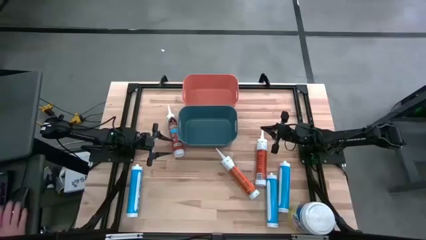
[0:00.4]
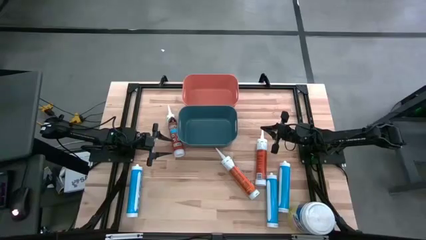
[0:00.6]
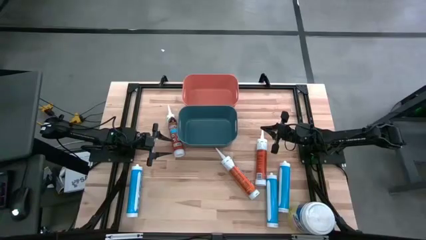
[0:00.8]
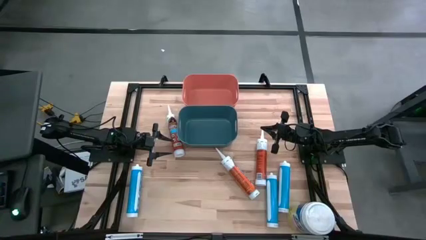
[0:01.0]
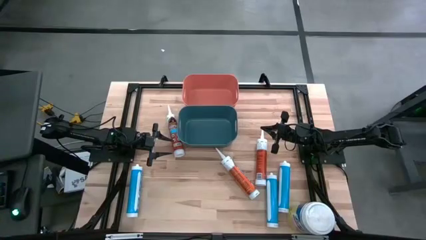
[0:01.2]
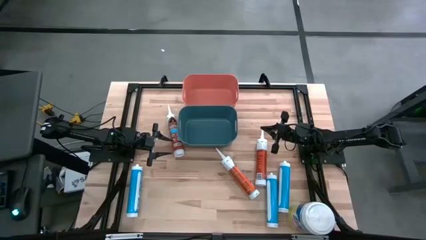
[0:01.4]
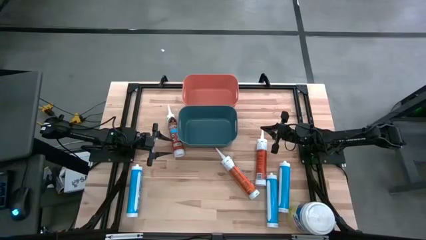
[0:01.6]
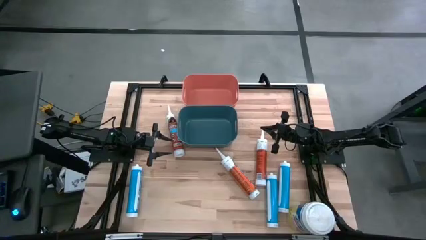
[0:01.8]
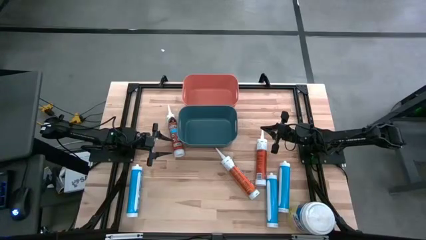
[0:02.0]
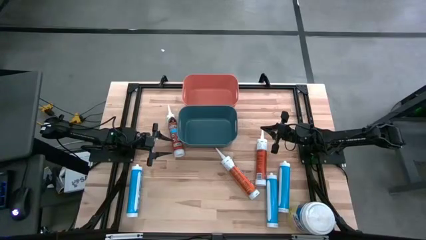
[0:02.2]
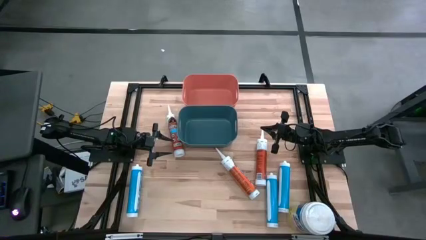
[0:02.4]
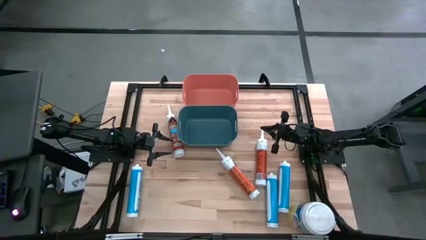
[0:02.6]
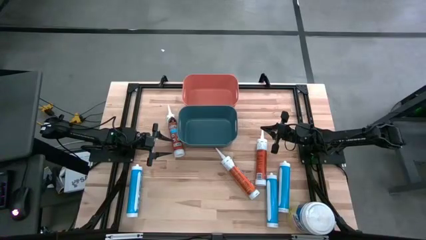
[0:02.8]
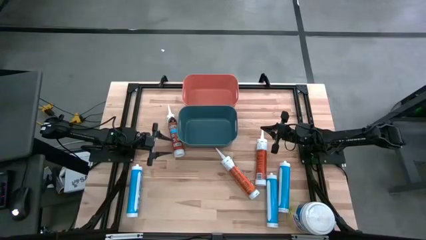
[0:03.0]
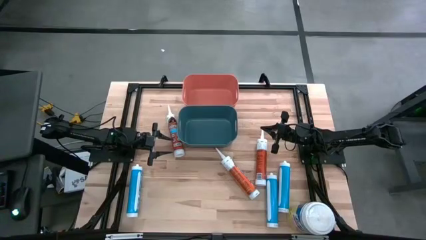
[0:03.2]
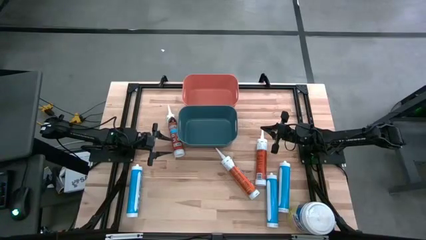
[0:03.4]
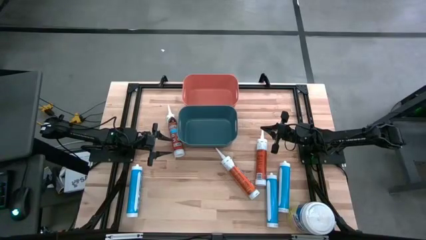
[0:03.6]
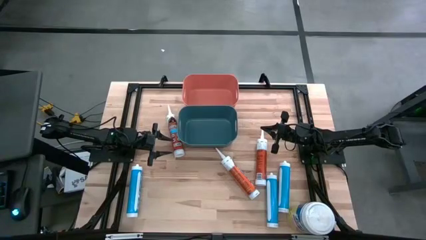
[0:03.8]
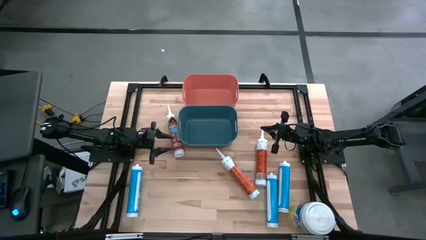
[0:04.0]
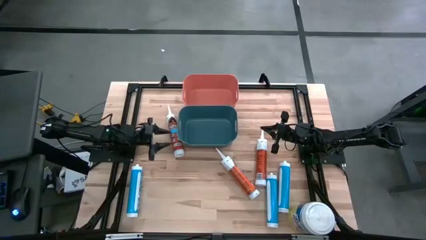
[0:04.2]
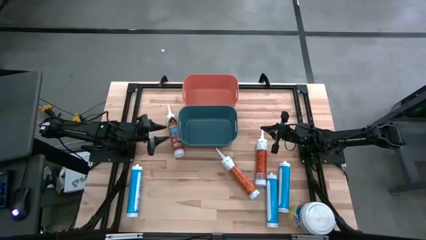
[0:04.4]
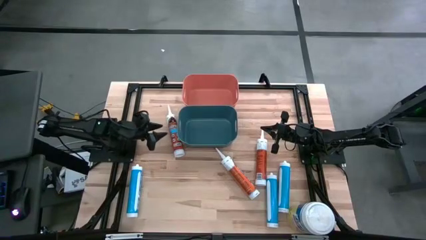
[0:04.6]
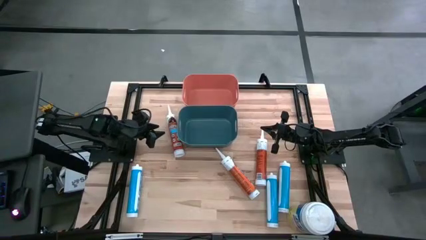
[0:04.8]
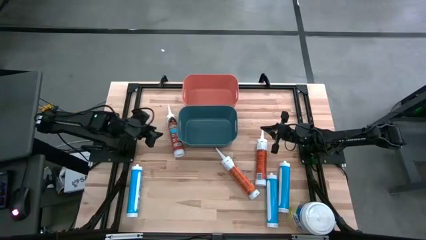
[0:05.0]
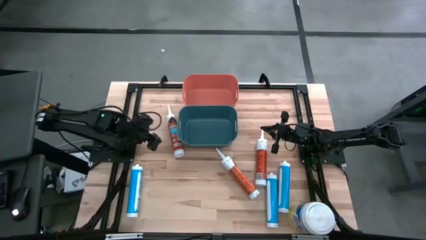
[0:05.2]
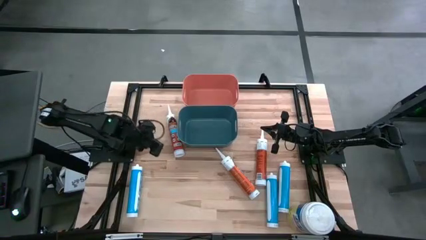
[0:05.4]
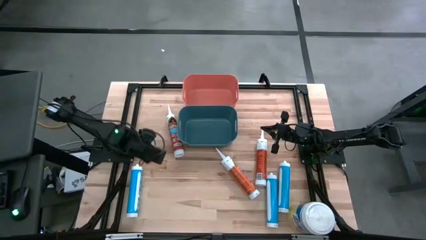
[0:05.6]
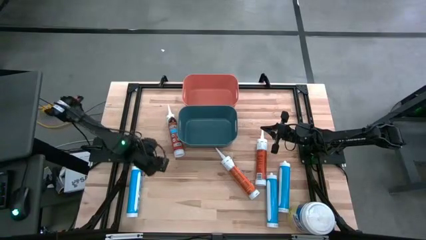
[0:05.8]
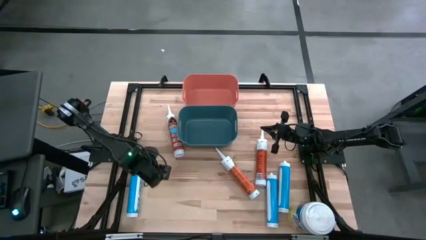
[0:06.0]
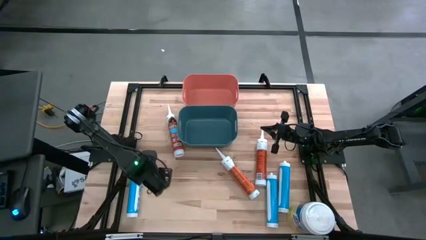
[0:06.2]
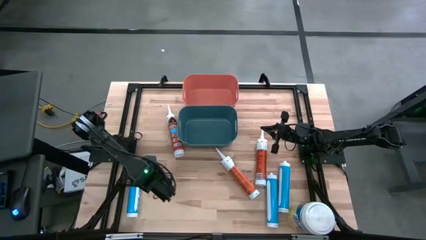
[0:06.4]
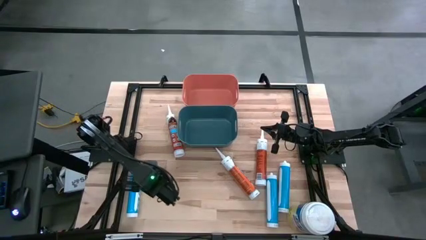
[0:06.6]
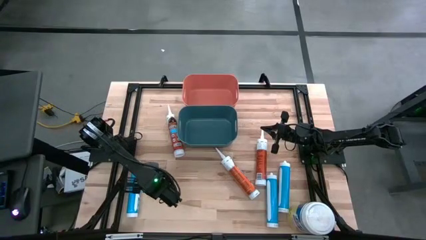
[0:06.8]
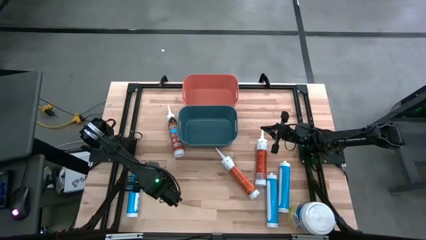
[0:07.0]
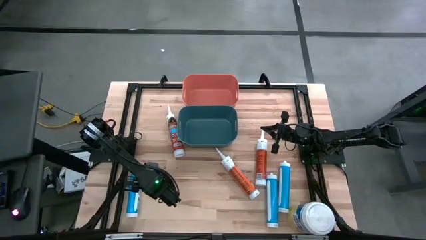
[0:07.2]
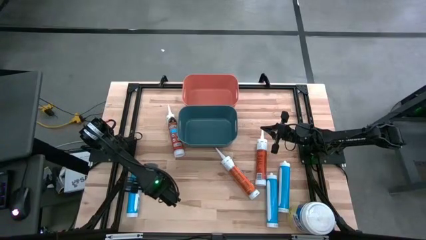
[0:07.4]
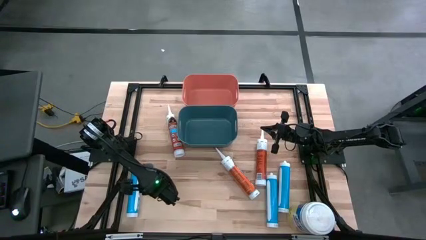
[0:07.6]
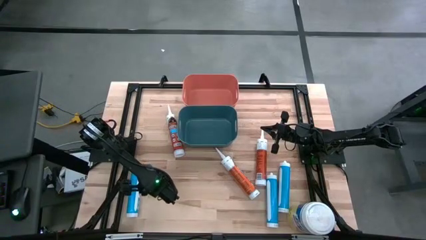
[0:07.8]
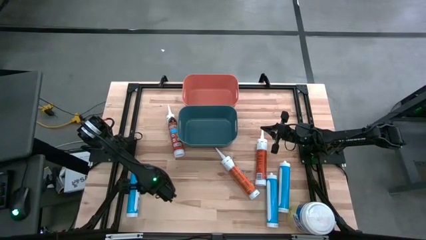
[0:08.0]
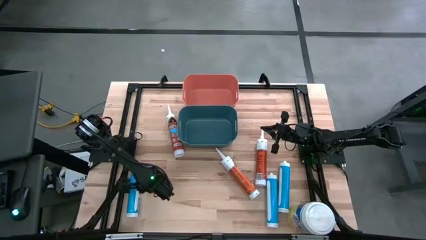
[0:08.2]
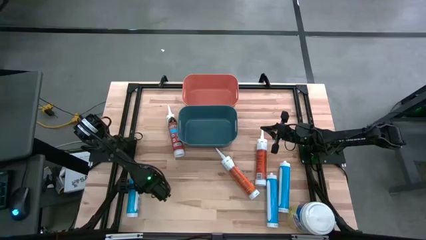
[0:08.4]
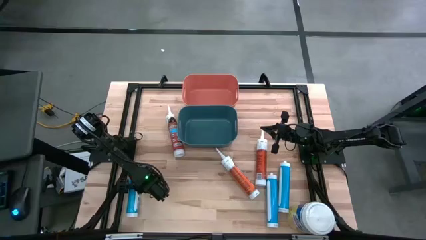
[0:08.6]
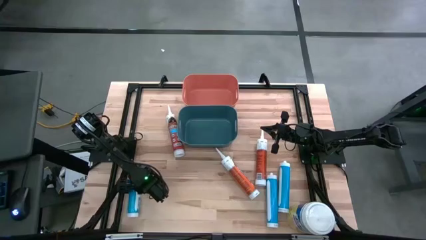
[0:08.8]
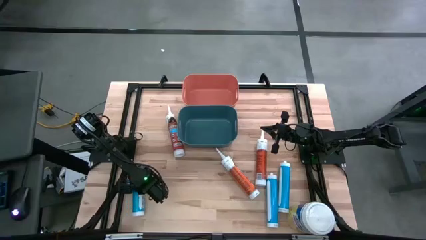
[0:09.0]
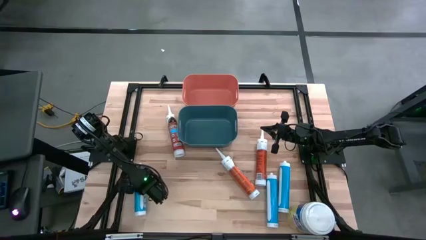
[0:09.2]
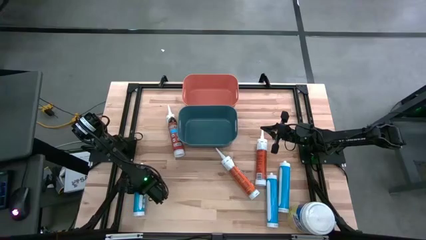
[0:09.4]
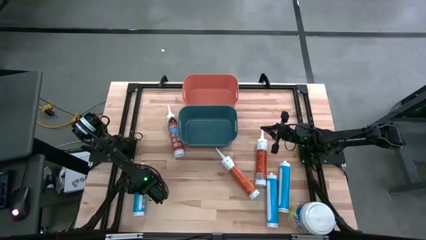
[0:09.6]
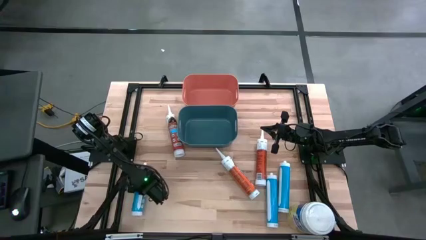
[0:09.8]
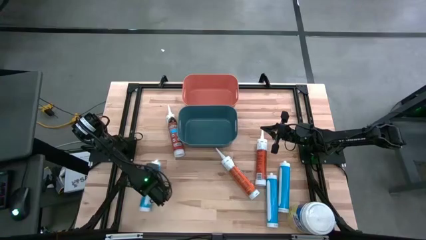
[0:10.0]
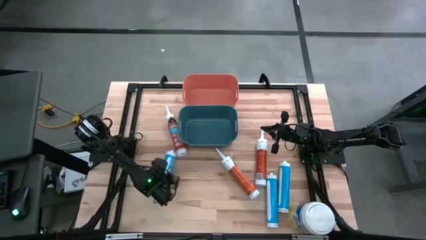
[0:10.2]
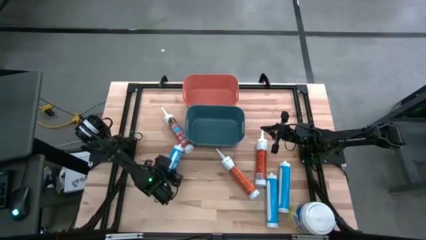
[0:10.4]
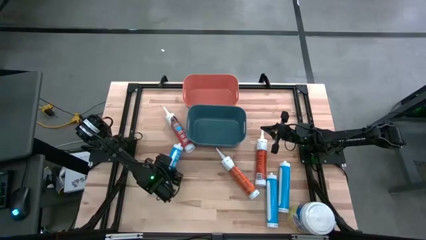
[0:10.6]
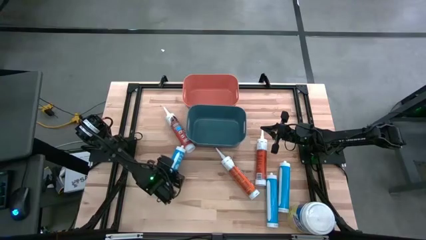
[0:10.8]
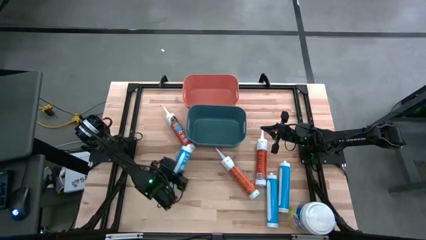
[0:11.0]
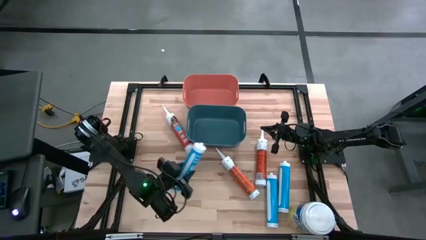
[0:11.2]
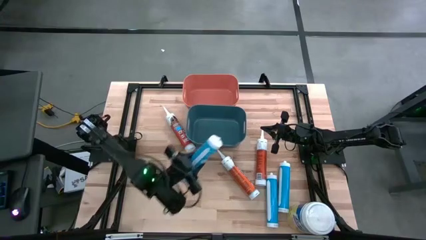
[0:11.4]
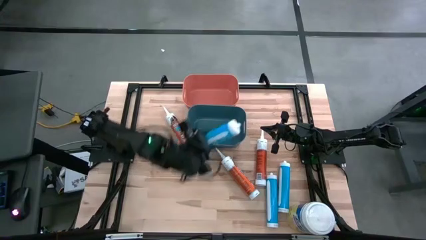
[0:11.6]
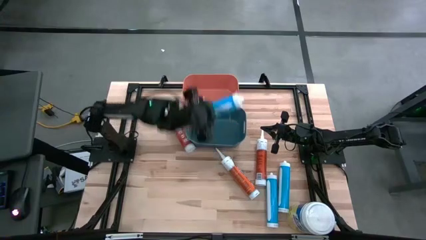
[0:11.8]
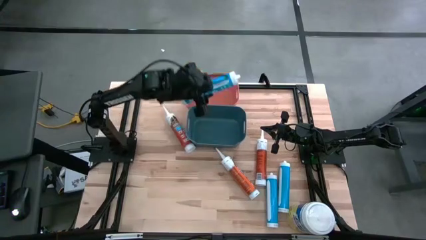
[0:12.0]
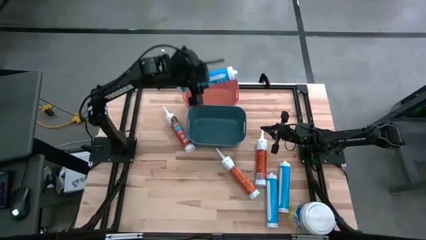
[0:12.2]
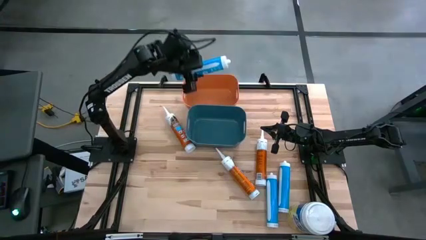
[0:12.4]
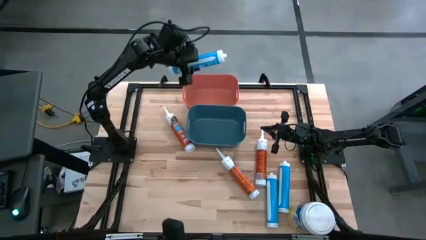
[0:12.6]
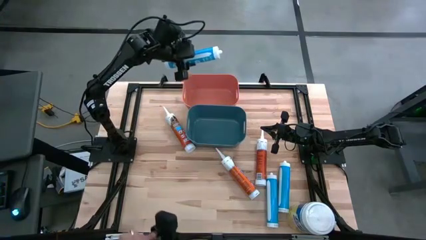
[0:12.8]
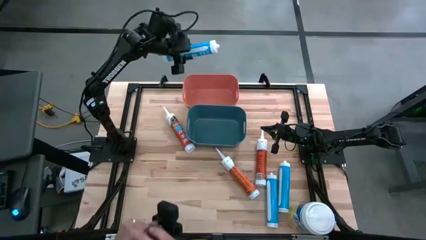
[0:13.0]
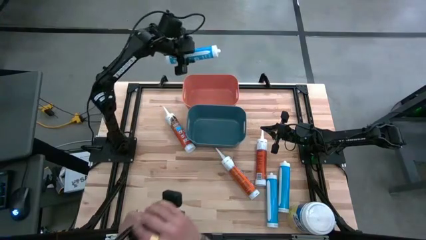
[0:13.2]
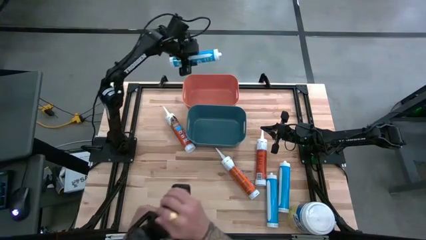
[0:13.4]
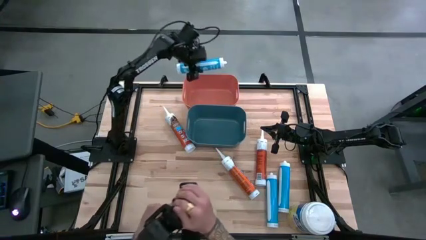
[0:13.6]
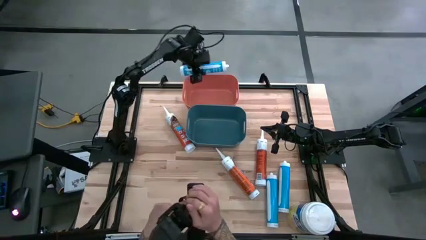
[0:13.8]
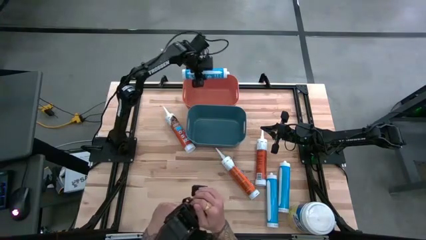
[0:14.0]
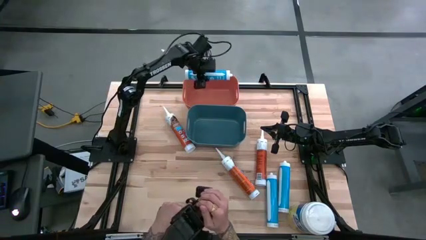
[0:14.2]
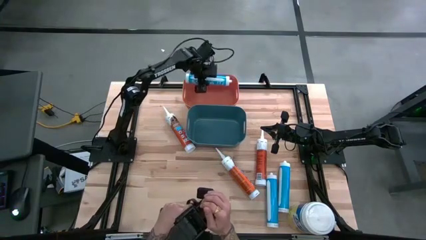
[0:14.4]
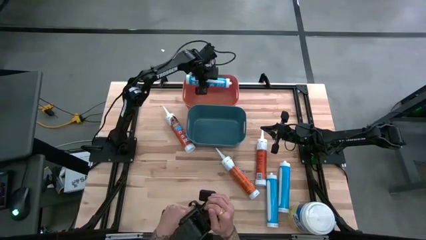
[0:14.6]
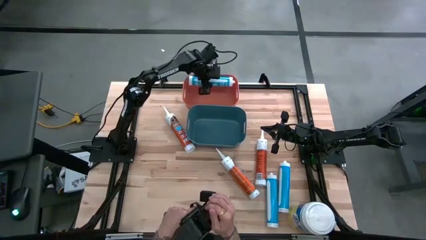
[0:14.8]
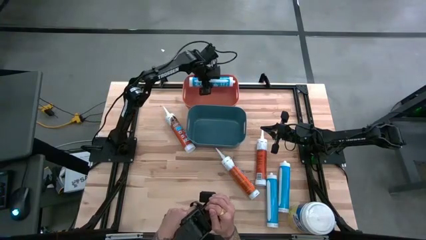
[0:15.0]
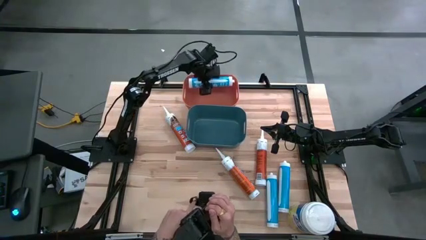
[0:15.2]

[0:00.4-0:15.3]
Task: Pick & place silicon tubes, Sealant and Lysol wipes
Put the left blue sealant into the orange bin
